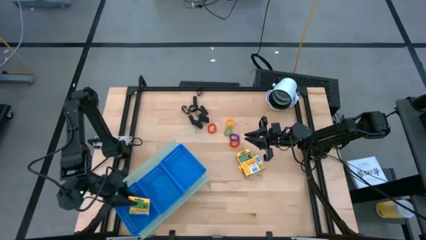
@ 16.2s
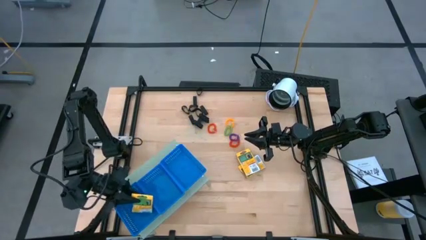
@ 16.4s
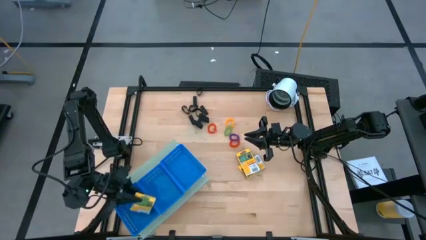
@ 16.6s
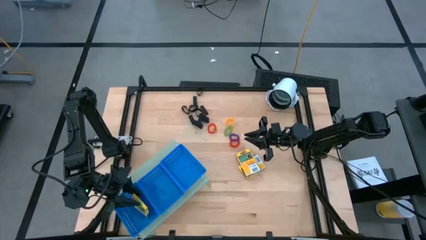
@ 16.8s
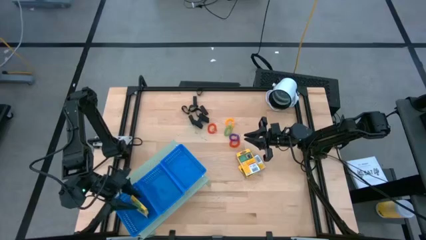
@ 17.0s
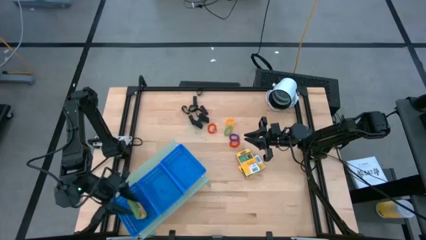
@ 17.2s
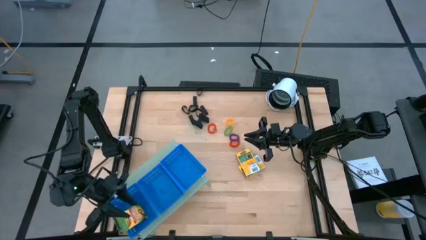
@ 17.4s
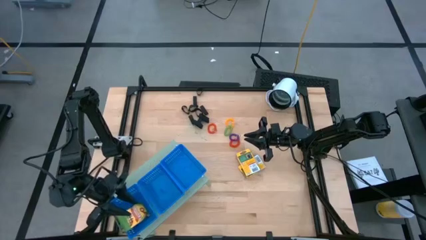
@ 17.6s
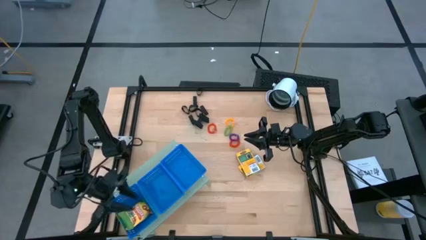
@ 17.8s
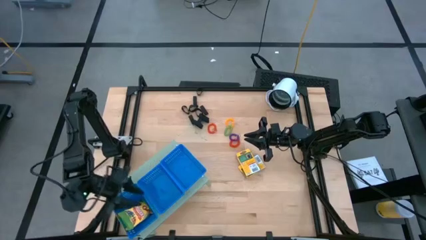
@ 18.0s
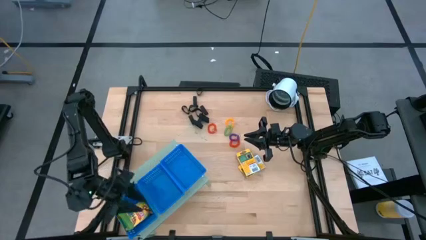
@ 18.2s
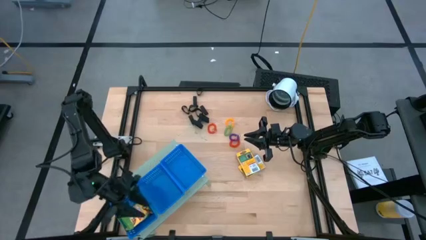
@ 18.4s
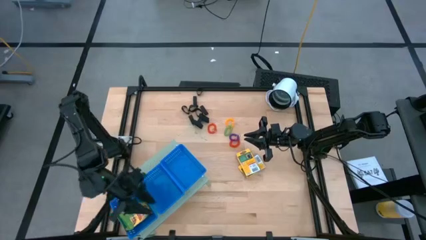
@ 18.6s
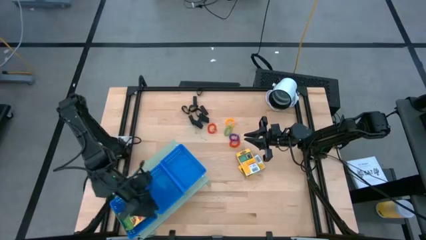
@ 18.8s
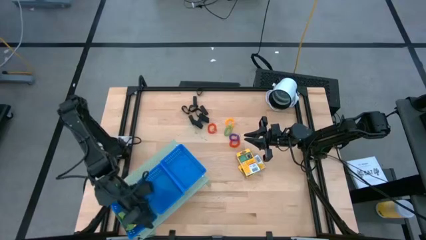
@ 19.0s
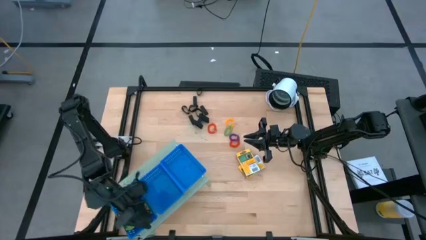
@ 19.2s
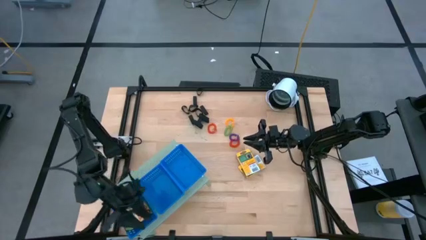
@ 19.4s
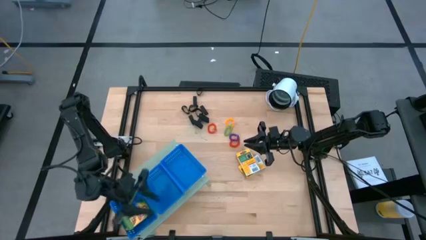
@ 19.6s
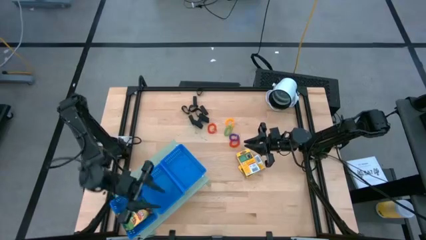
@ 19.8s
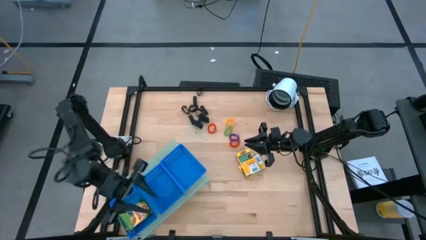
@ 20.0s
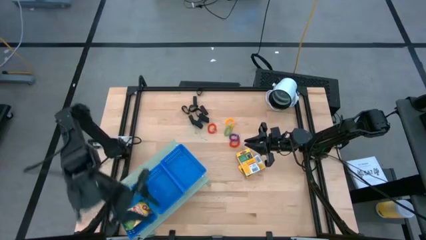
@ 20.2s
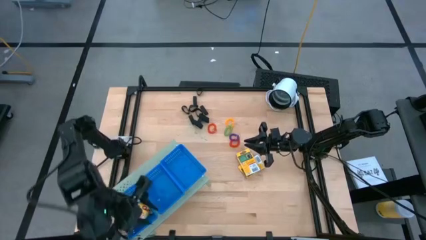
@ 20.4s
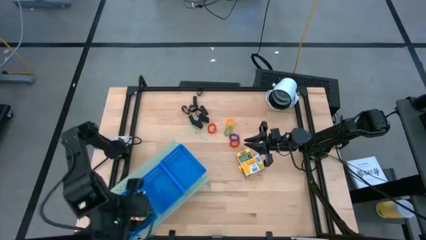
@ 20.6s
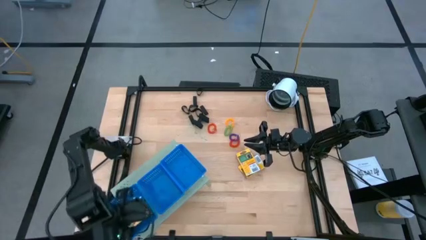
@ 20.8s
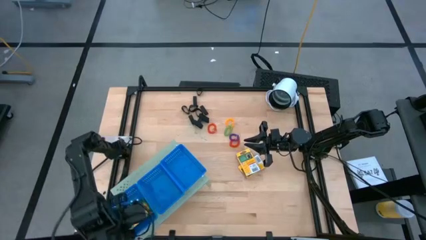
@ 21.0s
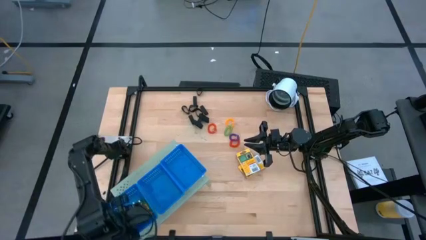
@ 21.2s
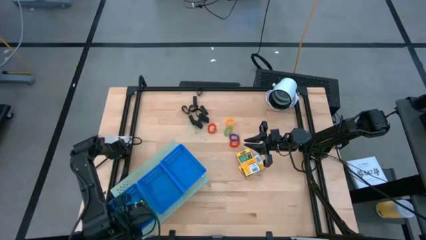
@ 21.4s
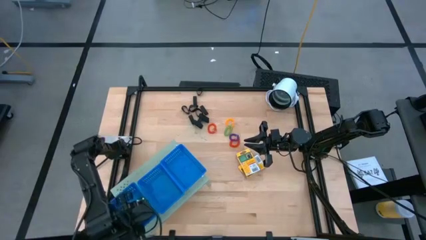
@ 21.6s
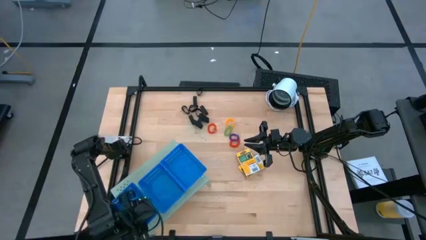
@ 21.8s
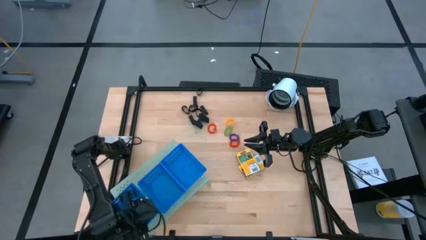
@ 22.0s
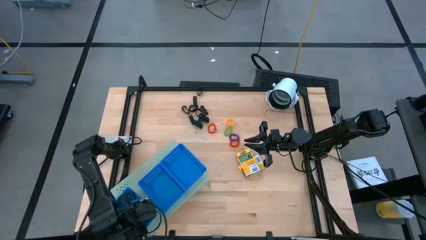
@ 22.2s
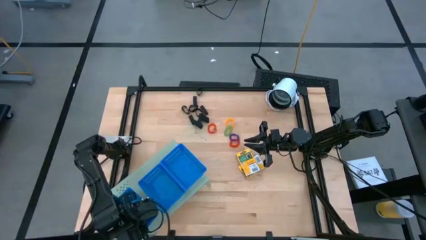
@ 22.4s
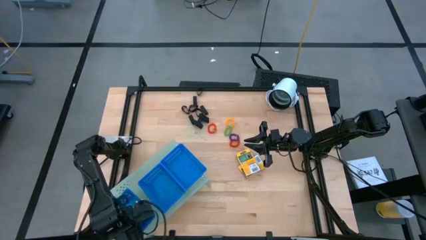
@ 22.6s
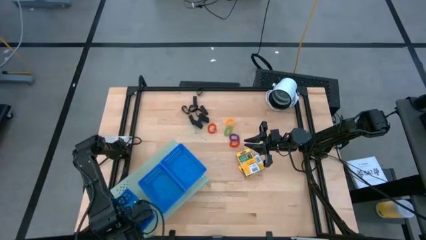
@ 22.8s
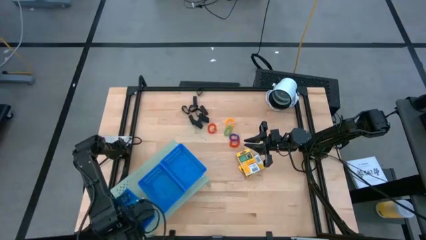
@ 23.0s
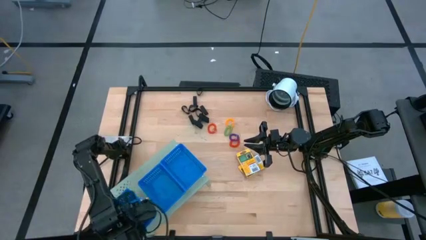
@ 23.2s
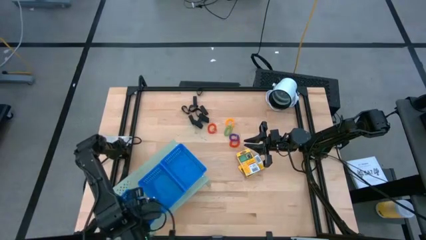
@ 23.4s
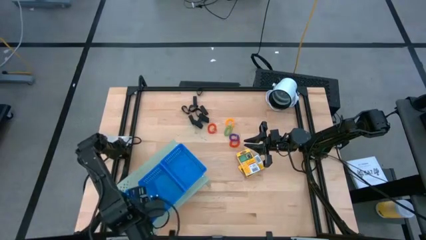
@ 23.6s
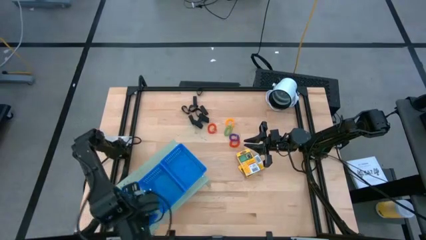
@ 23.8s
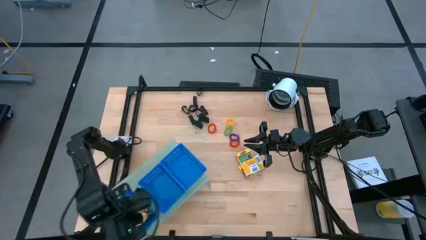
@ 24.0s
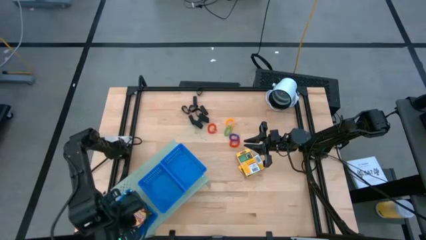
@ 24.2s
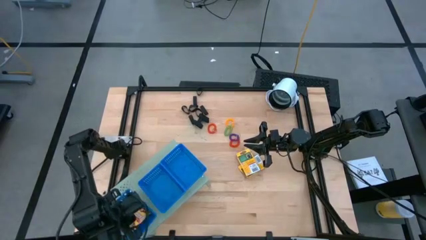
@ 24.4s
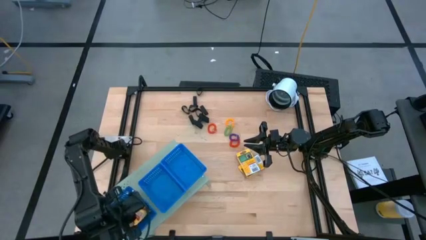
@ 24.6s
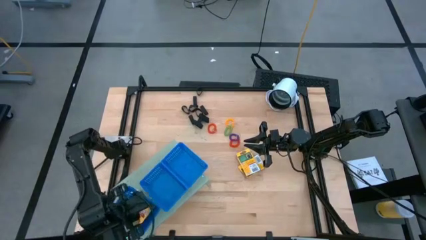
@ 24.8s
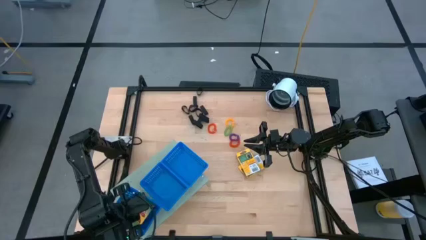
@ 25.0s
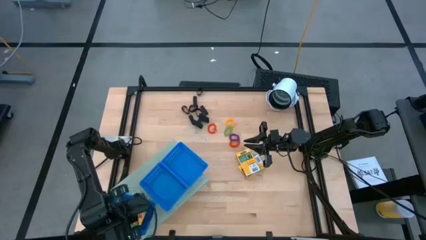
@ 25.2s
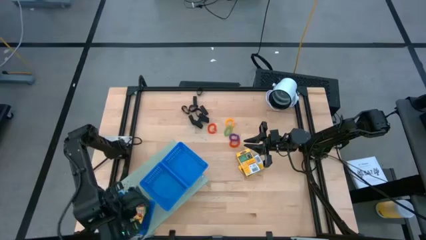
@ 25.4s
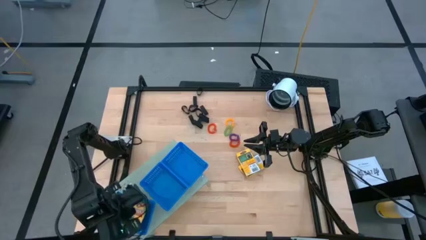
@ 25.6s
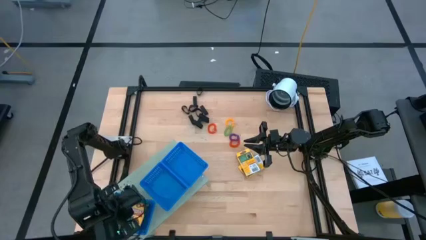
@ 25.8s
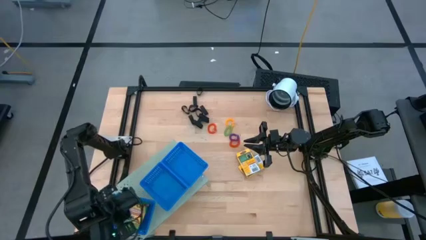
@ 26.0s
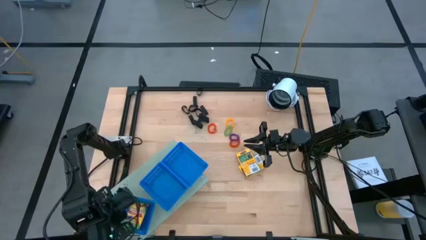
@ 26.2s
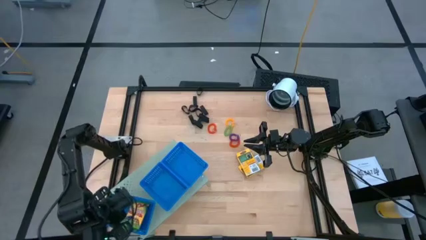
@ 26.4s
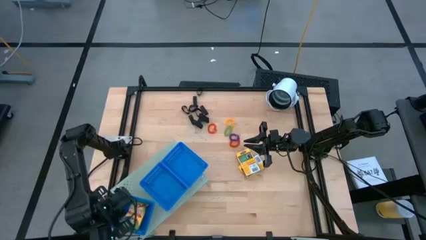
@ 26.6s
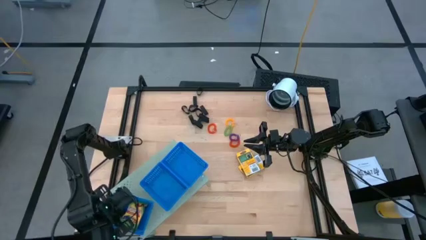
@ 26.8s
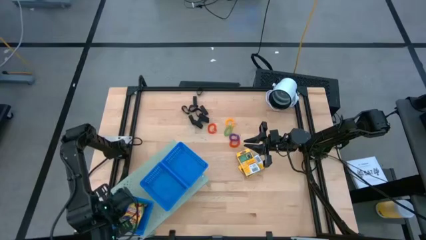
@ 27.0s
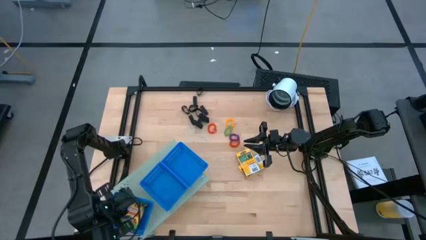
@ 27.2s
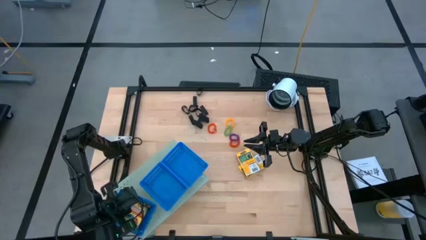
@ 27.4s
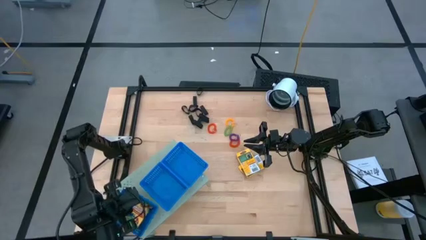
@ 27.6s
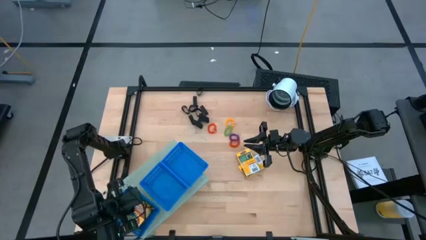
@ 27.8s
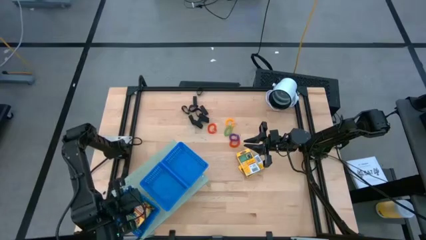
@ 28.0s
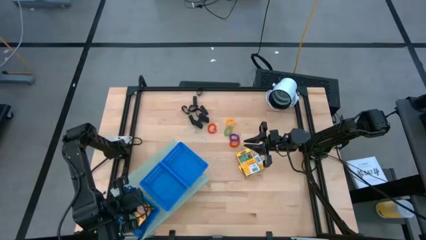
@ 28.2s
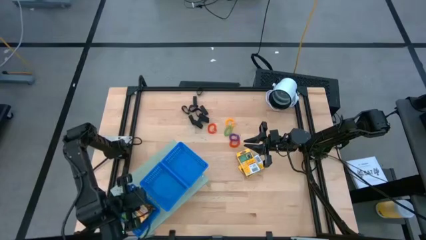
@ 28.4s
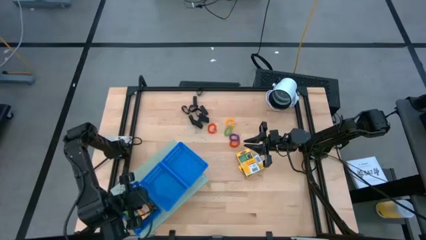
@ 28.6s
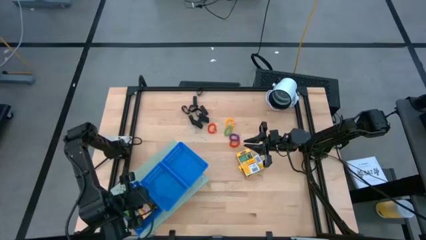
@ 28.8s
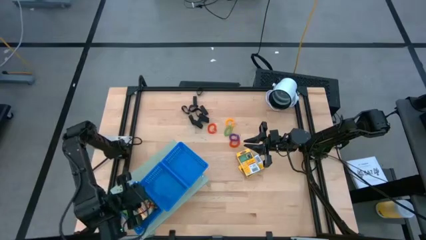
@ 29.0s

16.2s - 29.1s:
Task: Pick & Place Office Desk Supplies
Put the yellow crayon box into the bottom blue basket on the shelf
